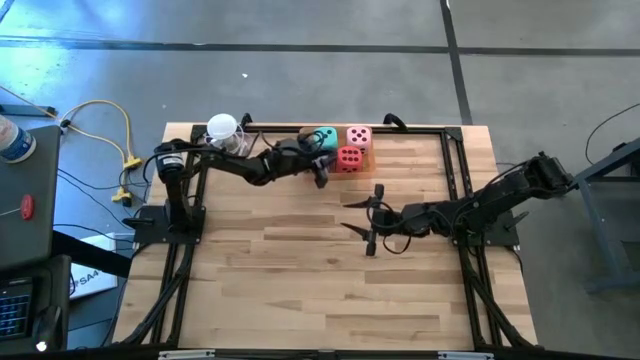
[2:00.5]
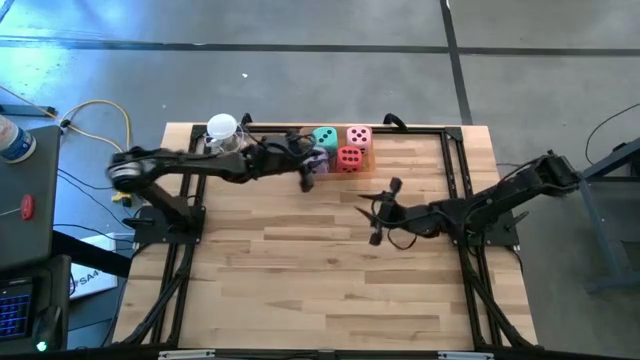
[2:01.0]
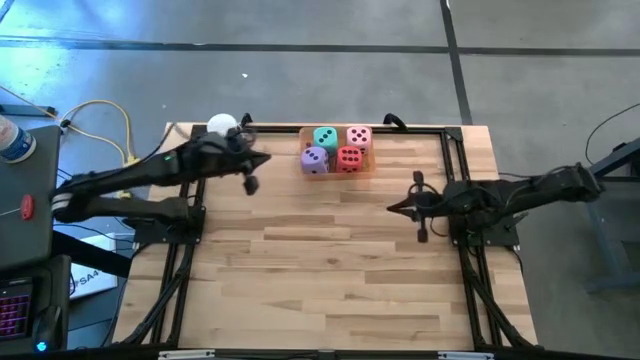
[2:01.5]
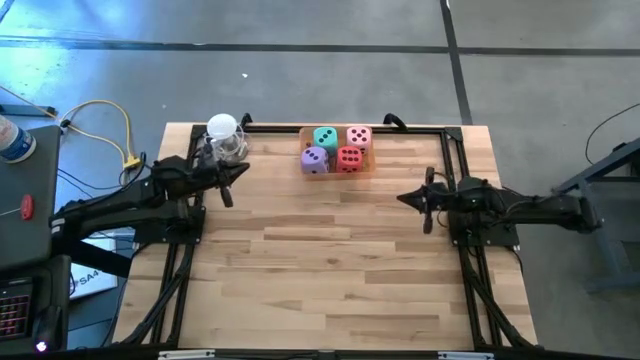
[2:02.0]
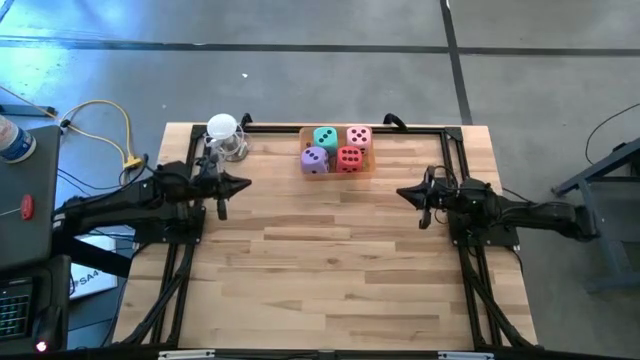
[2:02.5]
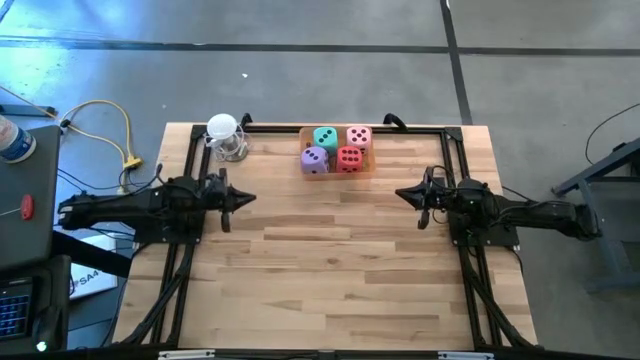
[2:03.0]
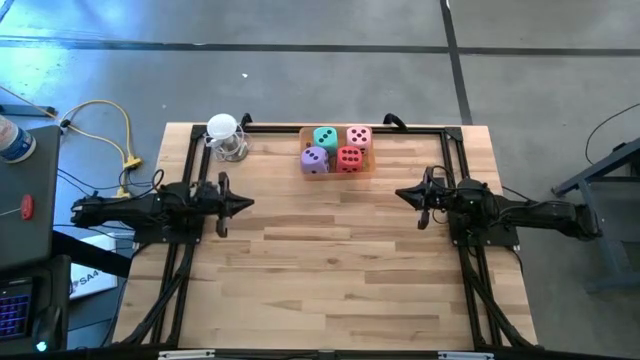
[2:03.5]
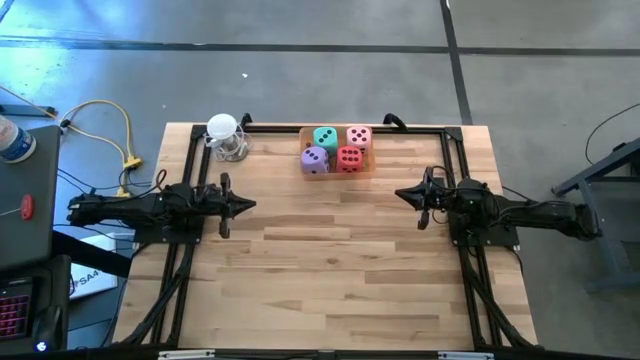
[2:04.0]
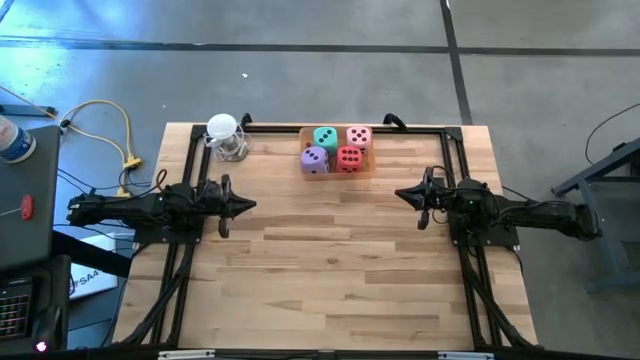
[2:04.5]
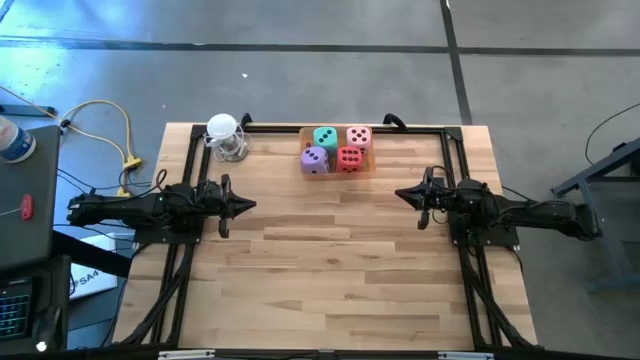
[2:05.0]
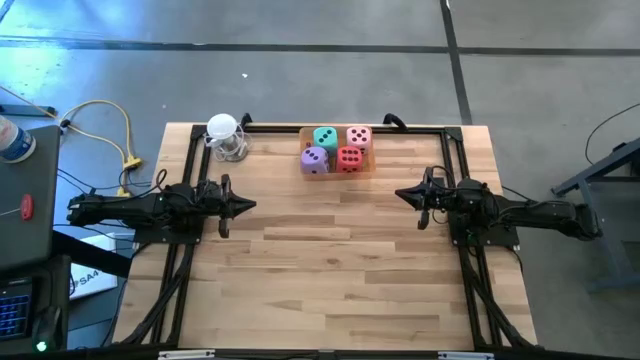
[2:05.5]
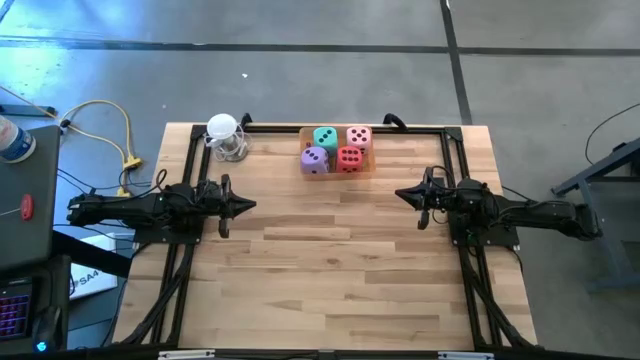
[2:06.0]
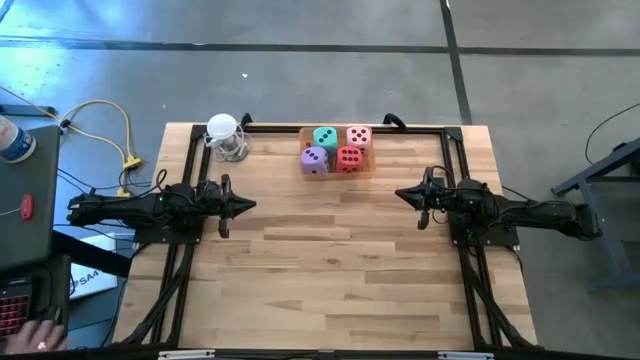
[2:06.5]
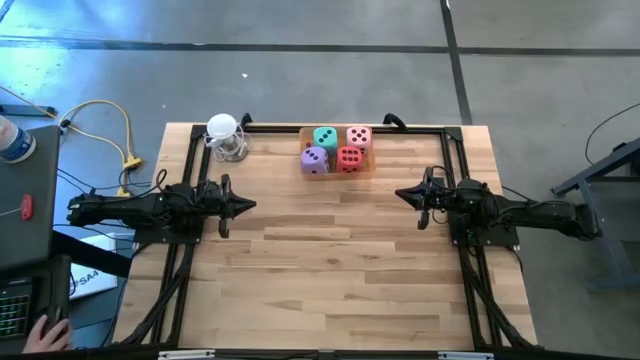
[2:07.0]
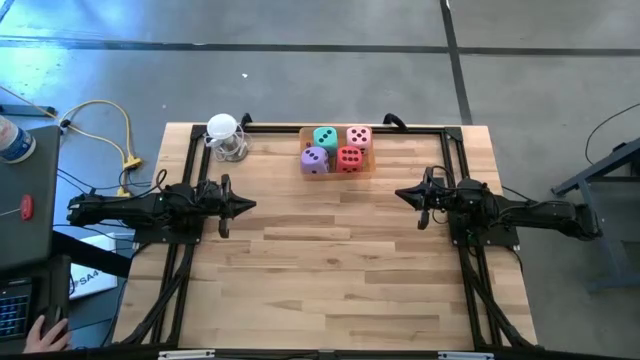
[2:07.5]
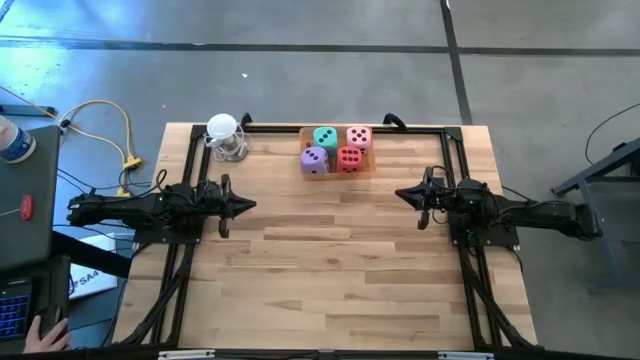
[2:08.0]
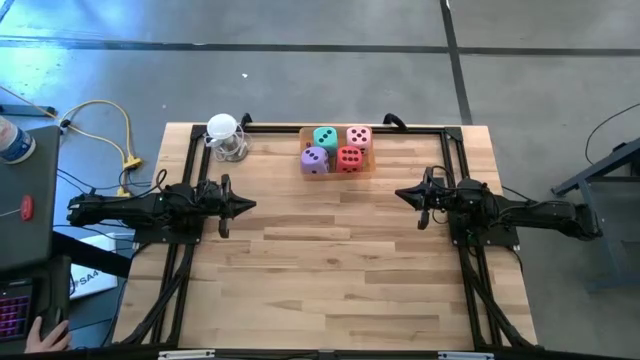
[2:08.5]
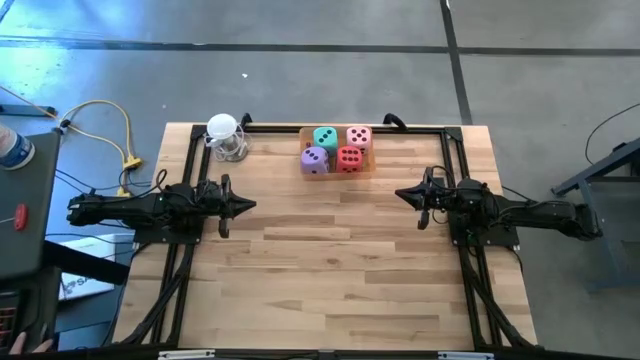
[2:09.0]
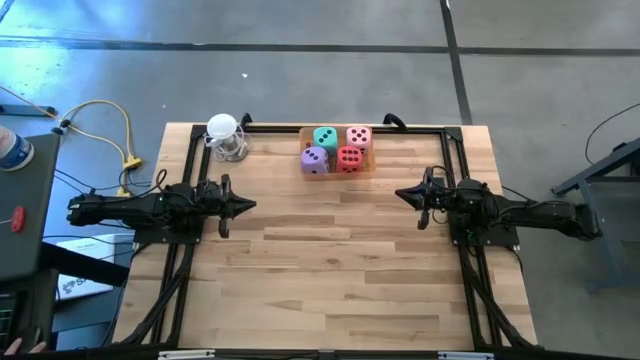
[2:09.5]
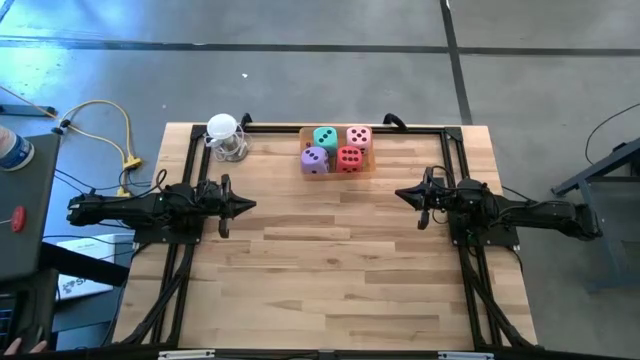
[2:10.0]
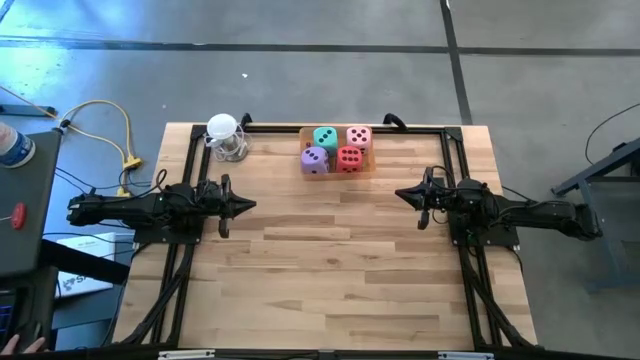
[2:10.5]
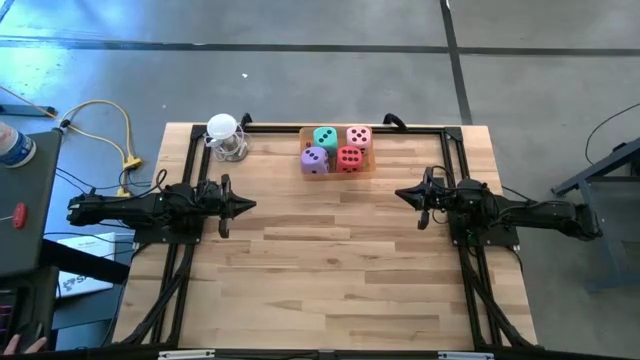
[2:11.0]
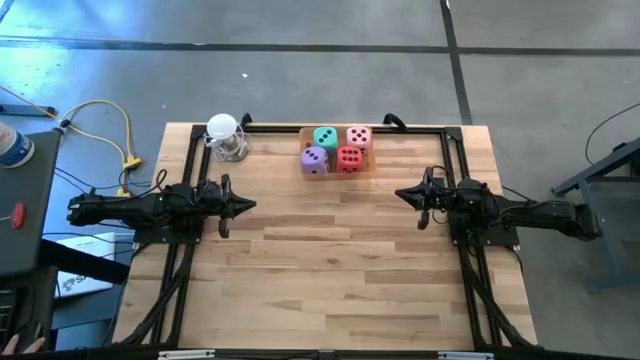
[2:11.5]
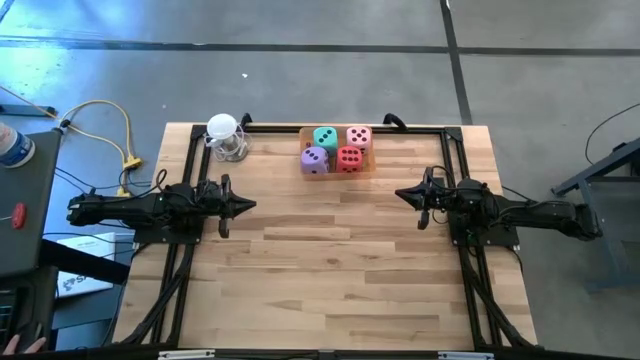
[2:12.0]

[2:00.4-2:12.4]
Task: Pick & Place Dice
Return to Home Position

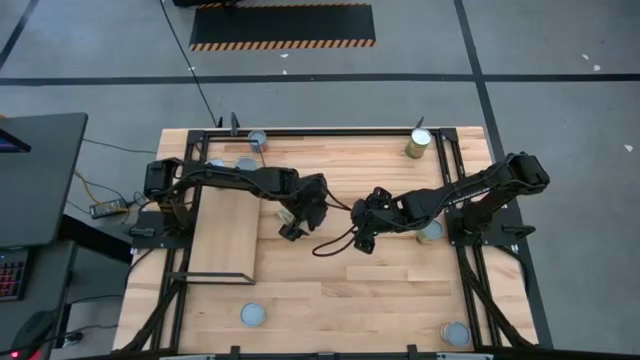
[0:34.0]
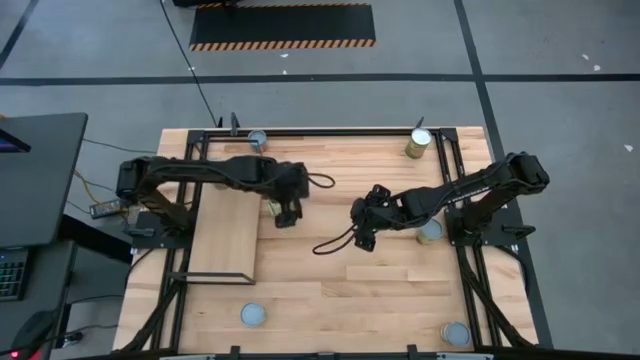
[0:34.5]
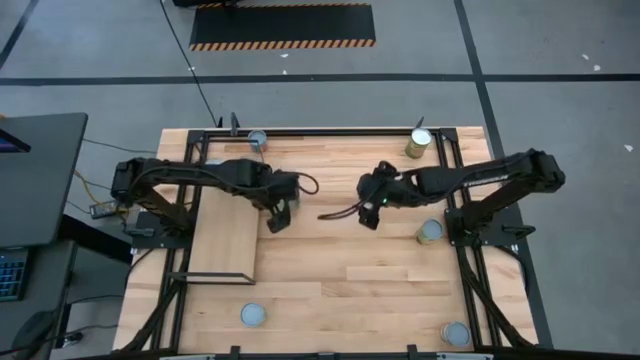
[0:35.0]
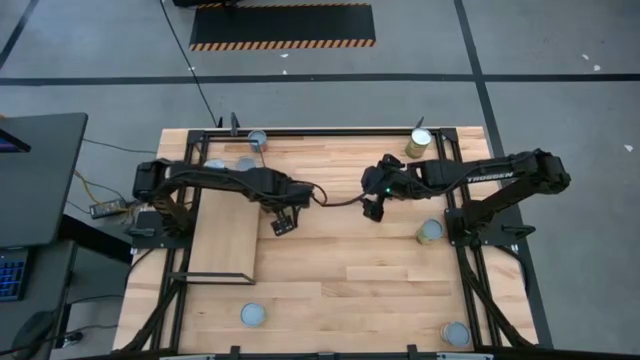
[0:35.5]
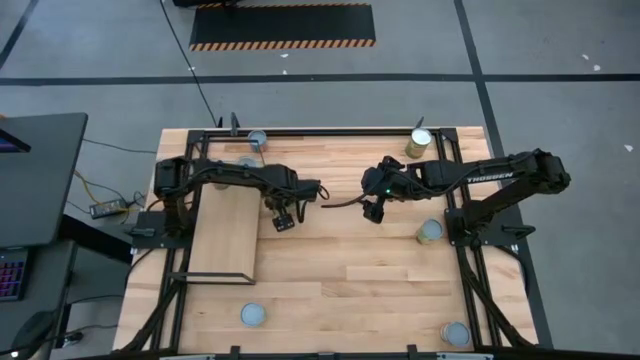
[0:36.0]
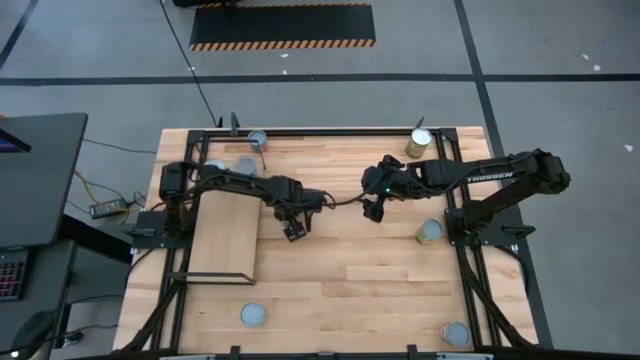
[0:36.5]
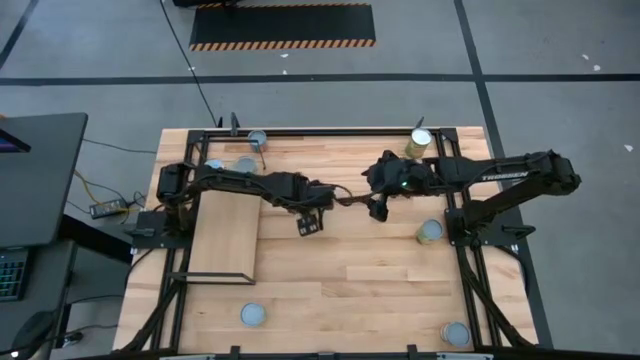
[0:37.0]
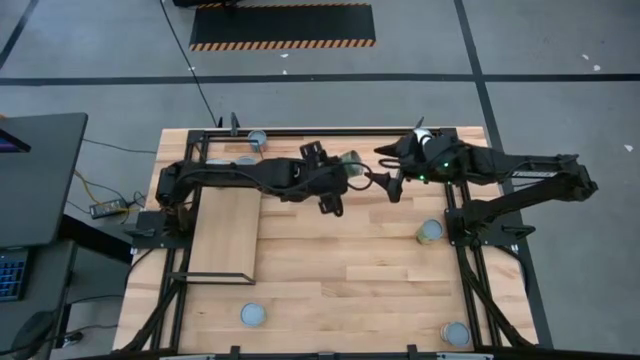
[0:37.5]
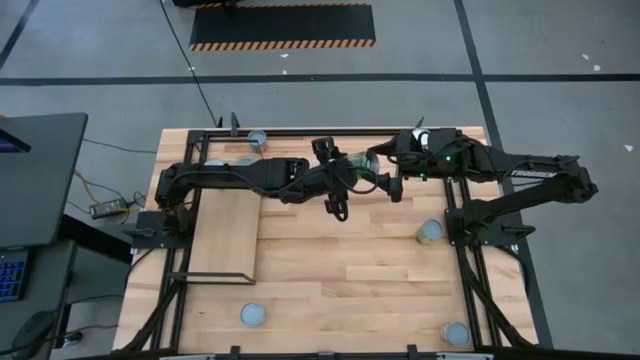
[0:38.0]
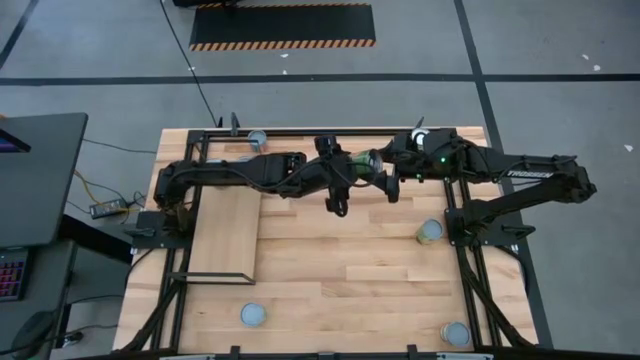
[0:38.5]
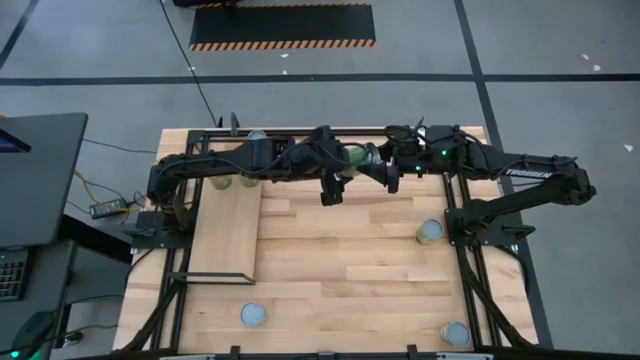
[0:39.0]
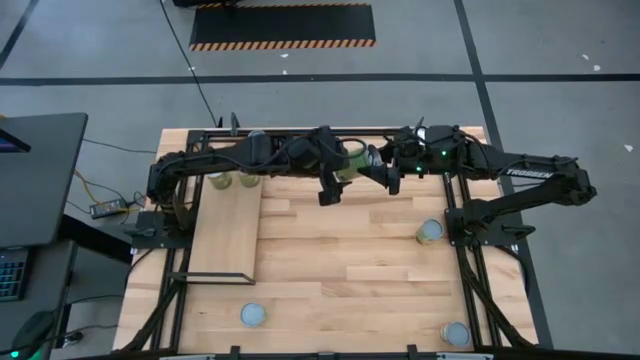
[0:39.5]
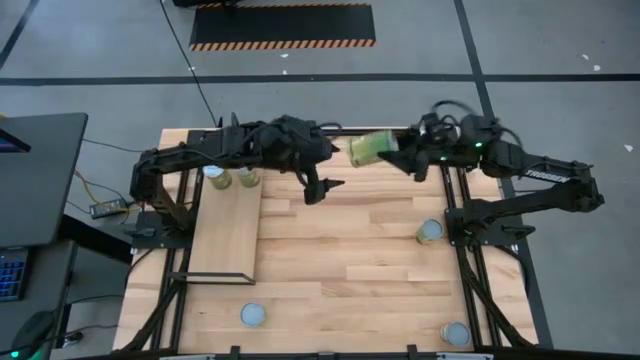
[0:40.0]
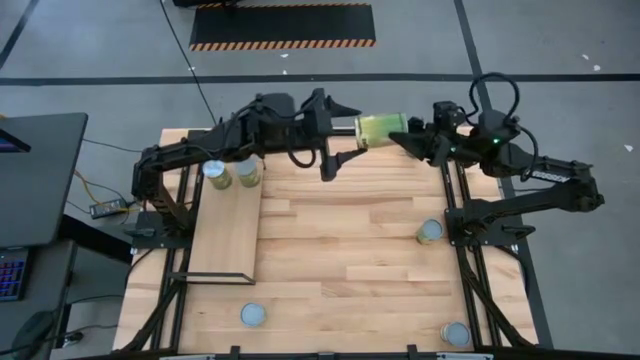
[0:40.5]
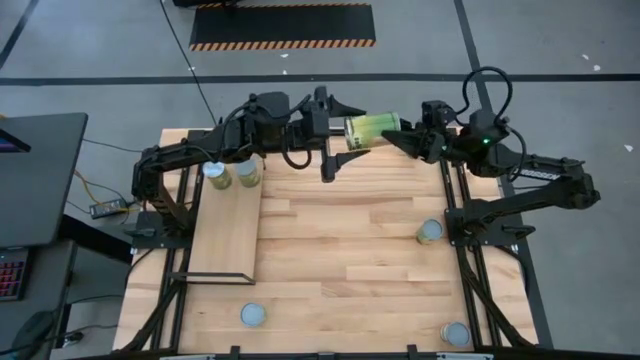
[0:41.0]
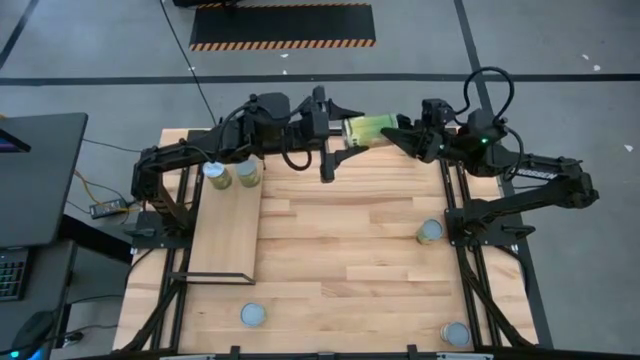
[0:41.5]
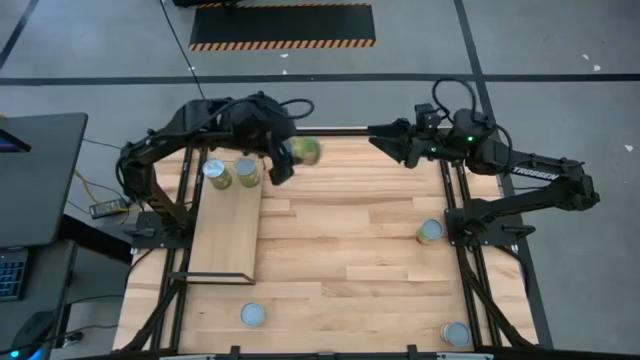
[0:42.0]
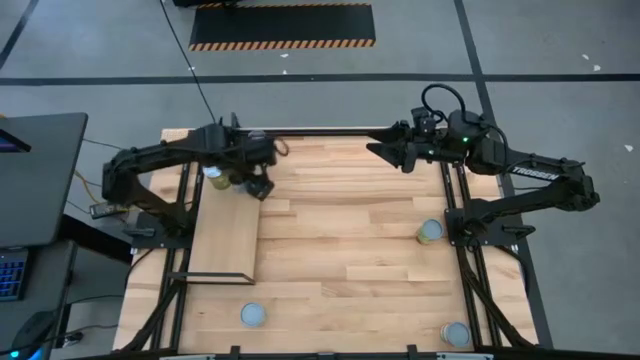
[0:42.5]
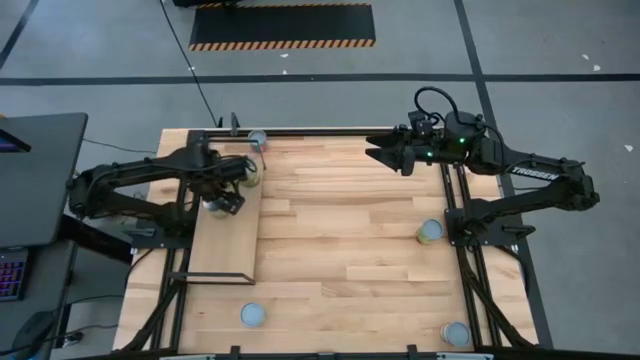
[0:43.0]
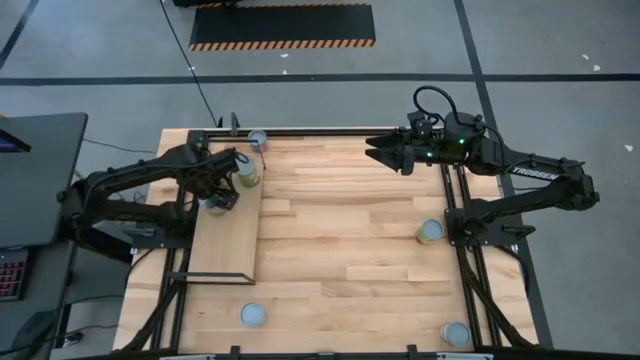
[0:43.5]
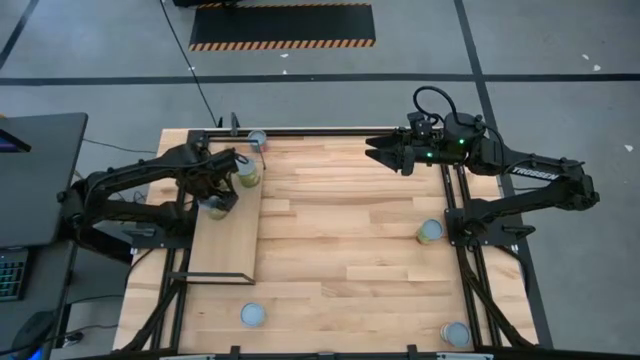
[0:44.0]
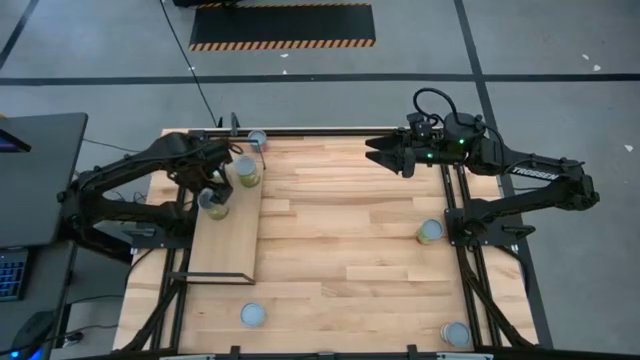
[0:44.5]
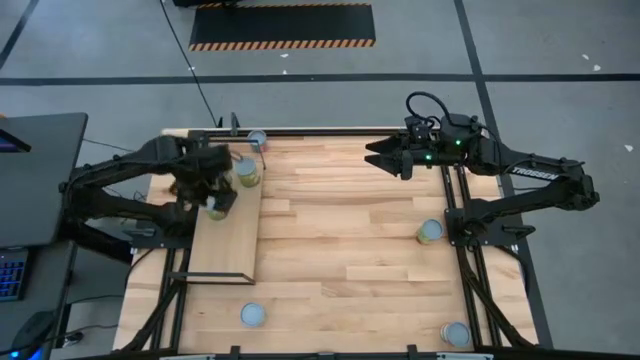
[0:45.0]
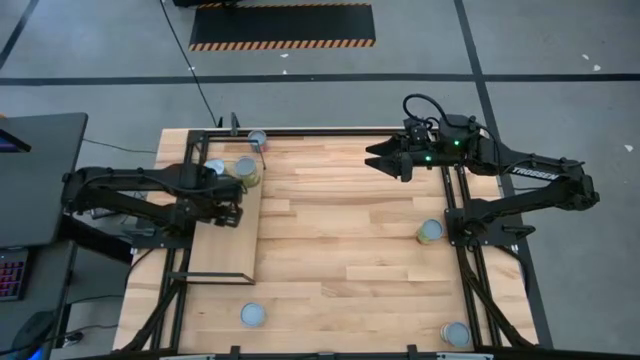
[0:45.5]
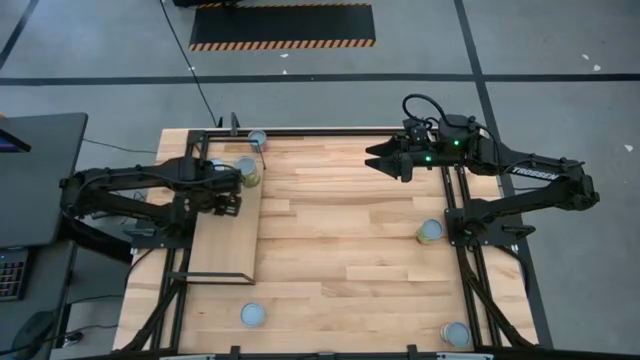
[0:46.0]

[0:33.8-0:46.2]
Task: Pick and place cans onto a shelf
Put the top large canned oranges on the shelf
